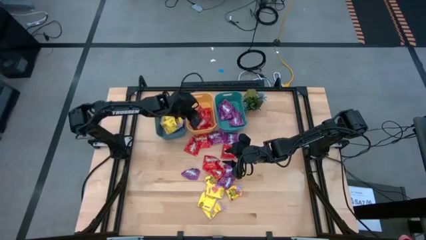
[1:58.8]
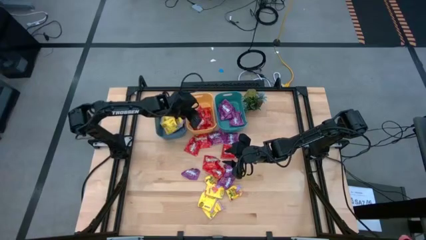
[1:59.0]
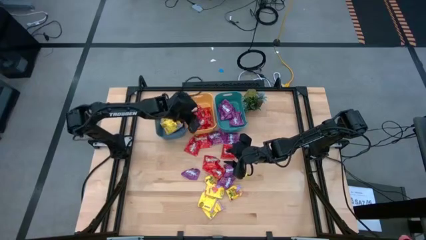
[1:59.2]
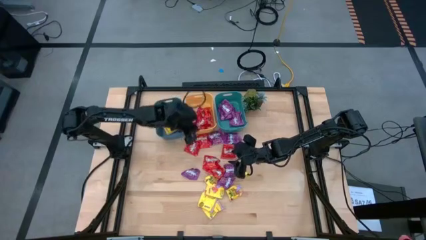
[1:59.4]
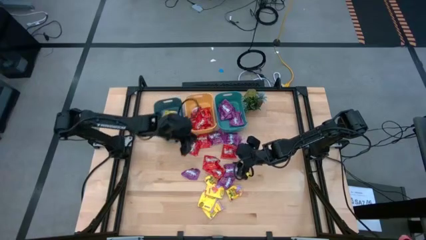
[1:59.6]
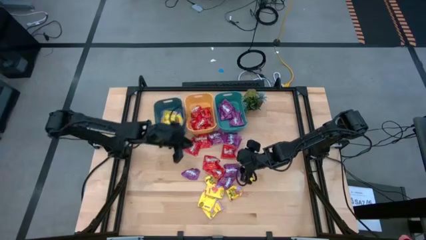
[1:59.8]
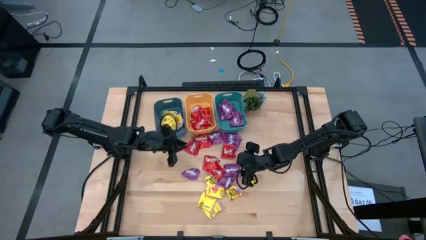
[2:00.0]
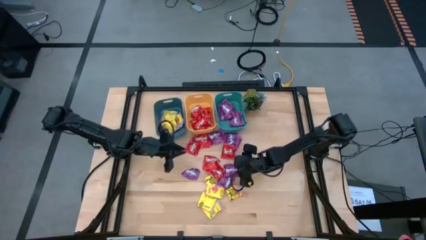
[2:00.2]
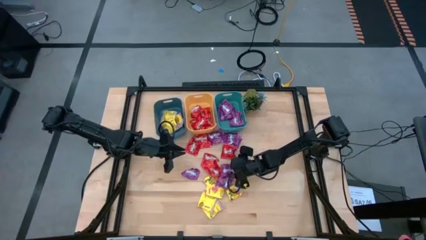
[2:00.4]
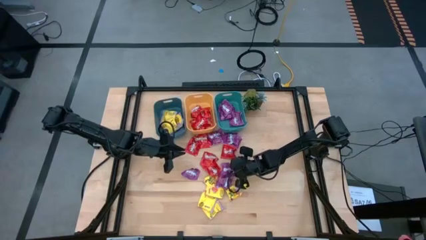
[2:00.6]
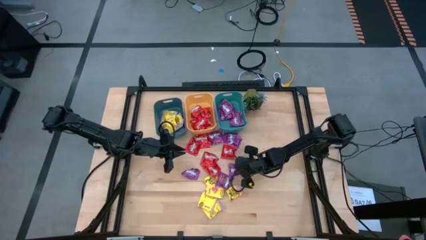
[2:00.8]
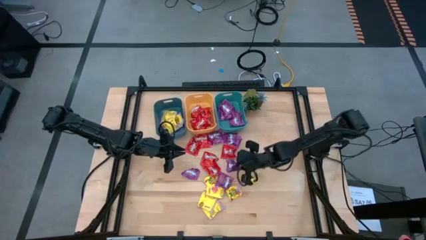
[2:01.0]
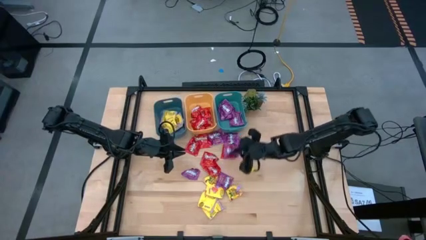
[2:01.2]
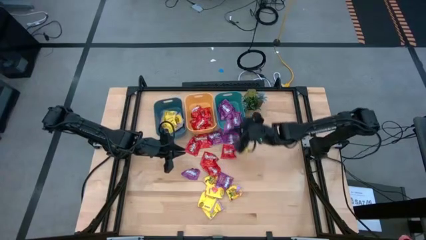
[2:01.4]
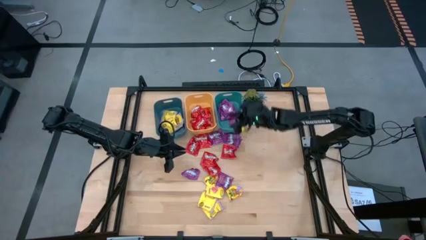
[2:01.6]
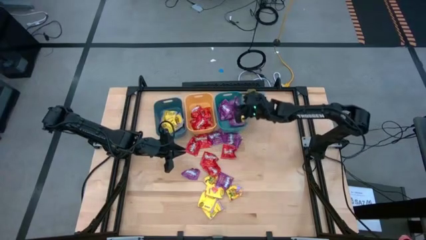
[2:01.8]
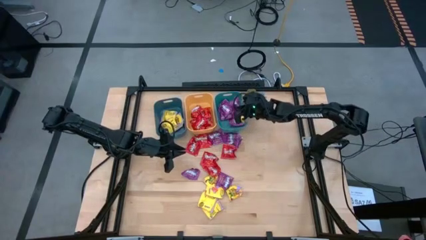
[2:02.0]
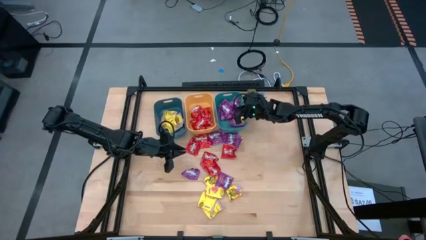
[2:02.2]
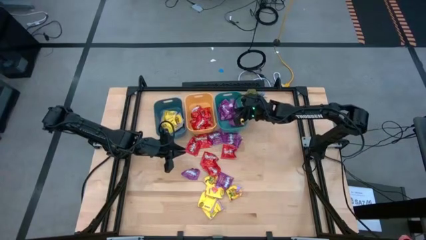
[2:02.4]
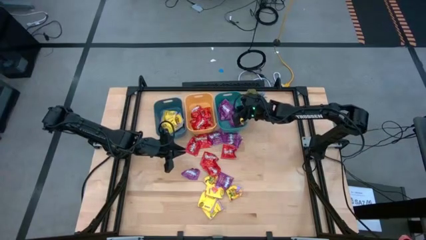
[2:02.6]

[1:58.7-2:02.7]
Task: Sort candy
Put the purple candy into the green bin

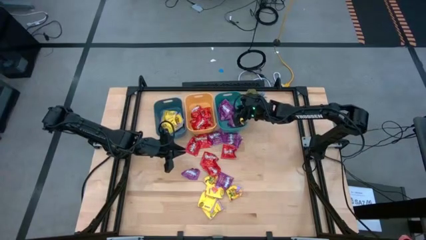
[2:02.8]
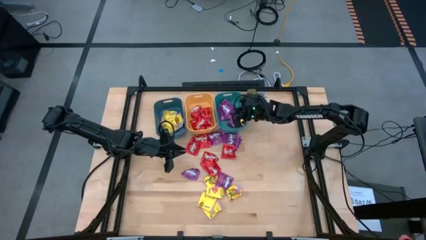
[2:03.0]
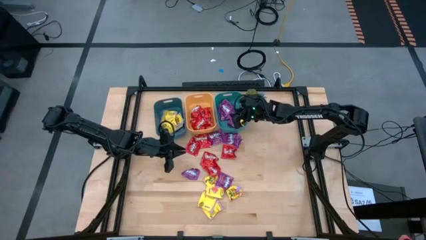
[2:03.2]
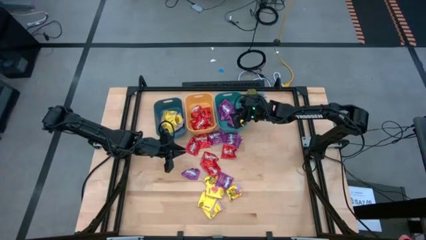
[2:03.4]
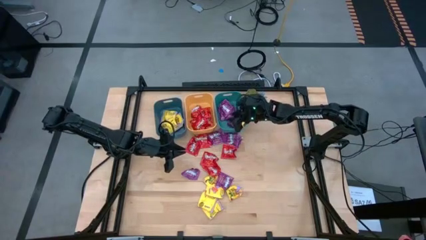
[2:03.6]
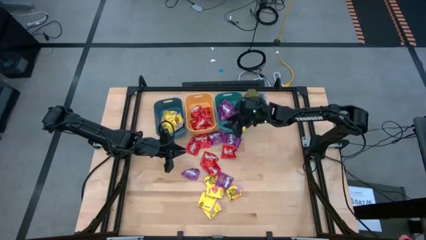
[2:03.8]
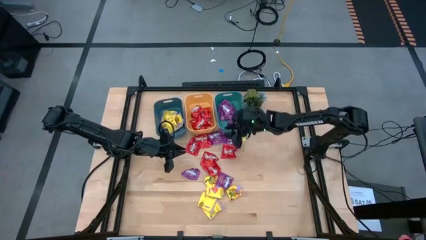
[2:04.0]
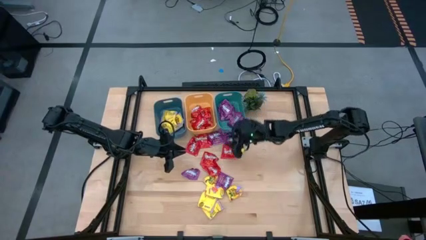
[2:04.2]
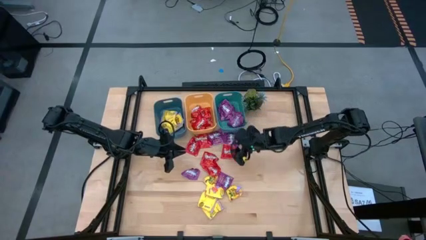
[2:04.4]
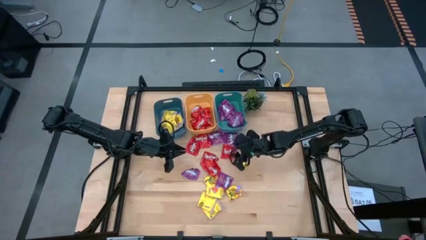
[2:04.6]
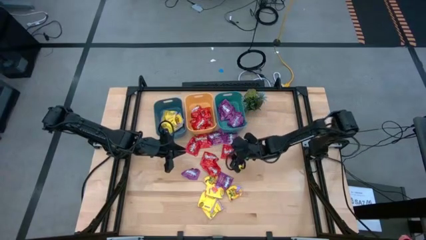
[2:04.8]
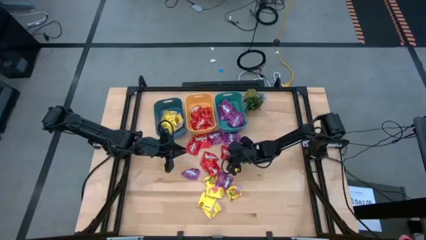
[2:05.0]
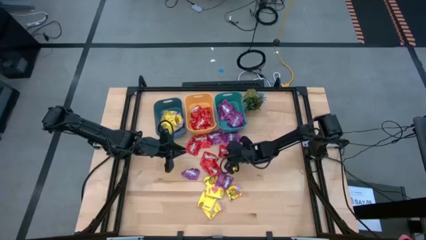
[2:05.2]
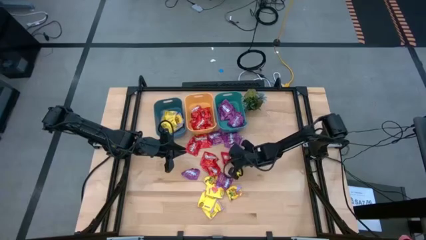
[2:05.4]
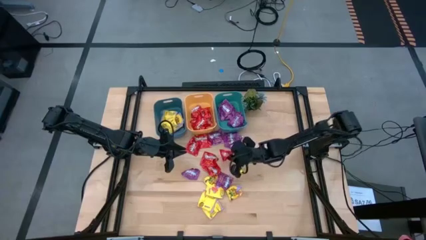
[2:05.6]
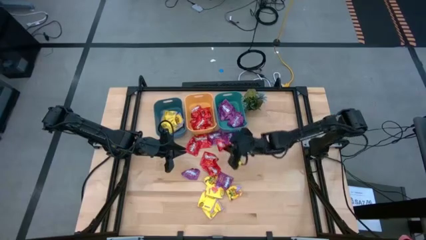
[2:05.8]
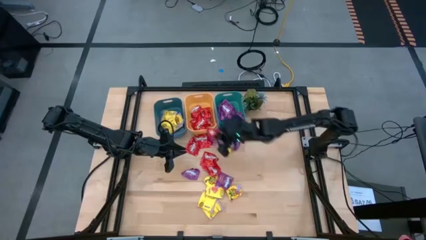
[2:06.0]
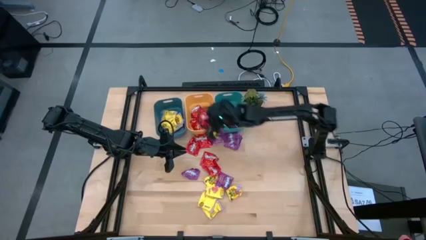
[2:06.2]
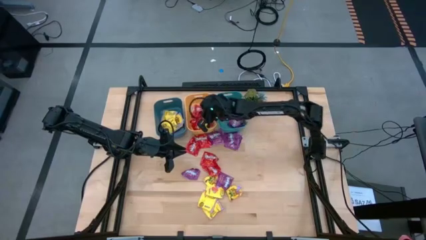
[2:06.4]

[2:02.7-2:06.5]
Put the red candy into the yellow bin

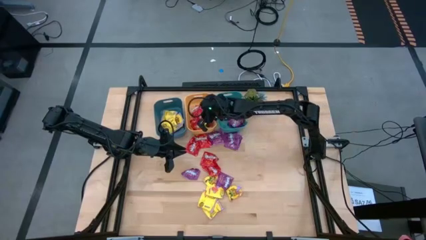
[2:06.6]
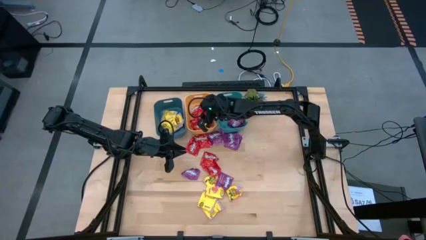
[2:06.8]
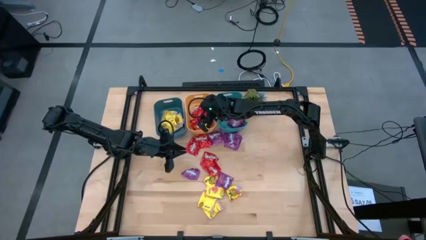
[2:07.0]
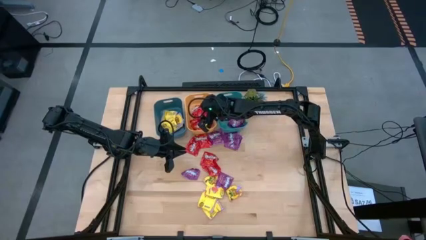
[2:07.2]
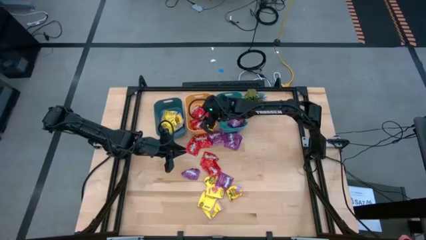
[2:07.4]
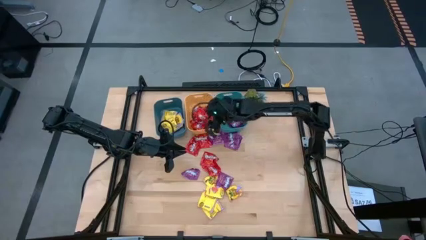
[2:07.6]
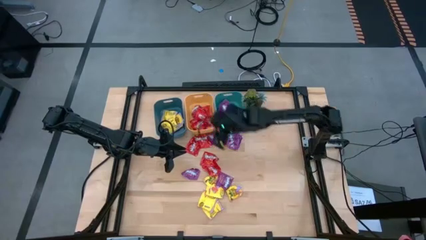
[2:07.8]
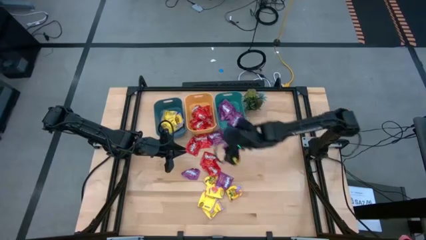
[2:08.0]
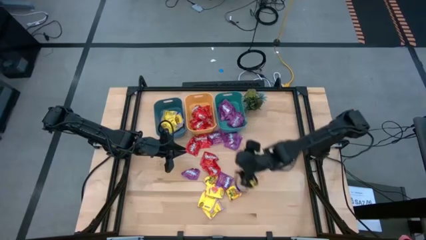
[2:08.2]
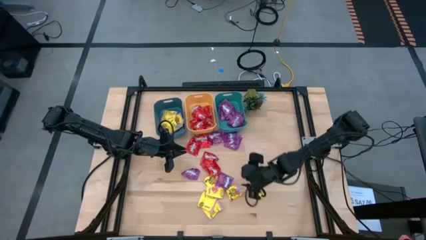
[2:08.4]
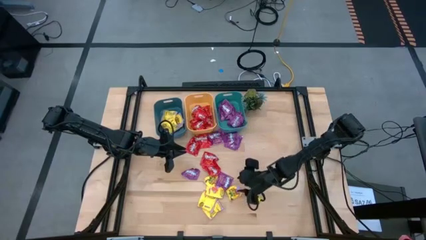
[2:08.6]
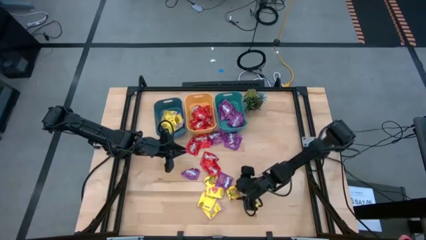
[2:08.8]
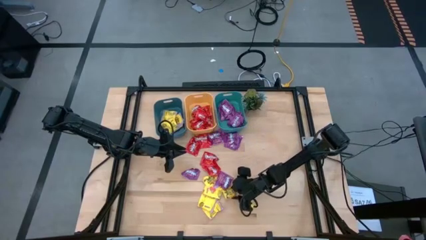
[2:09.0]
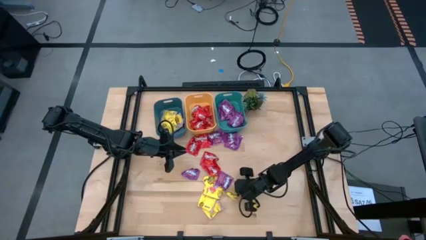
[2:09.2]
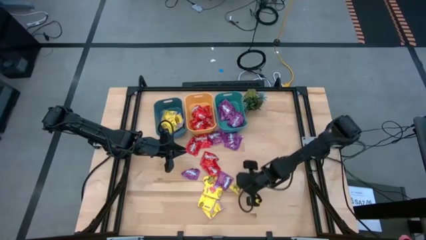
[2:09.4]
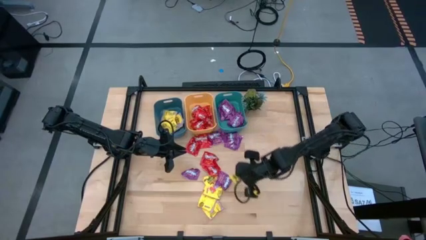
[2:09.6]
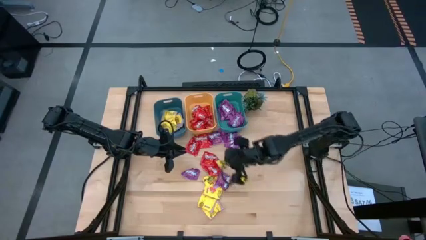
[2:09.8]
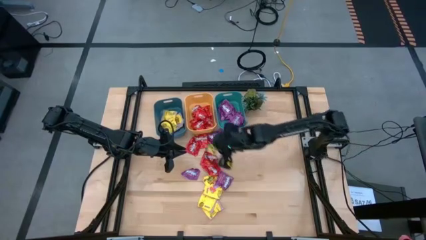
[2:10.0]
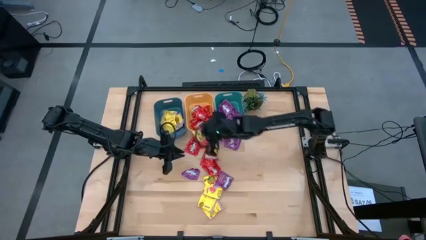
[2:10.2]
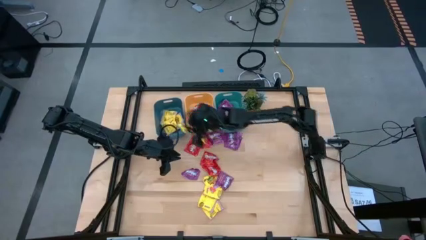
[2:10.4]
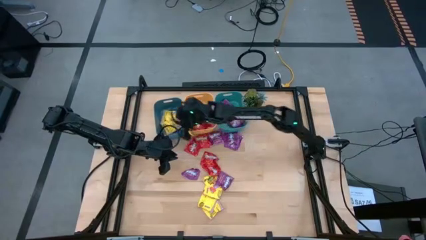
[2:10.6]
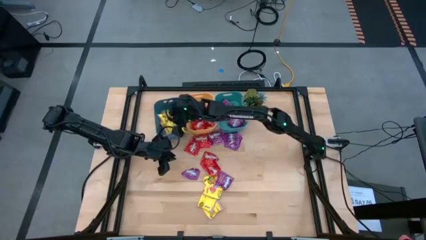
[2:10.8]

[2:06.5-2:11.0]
Put the yellow candy into the blue bin

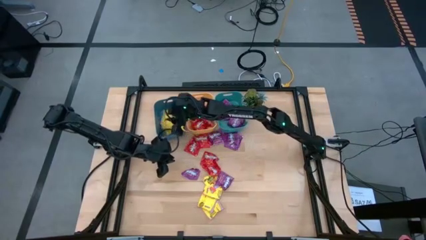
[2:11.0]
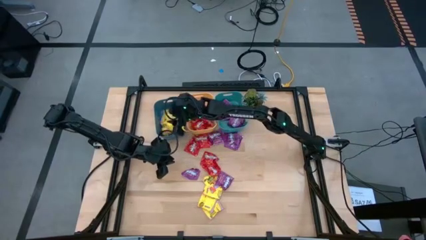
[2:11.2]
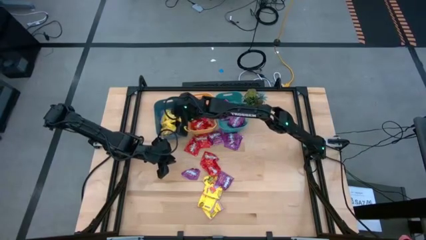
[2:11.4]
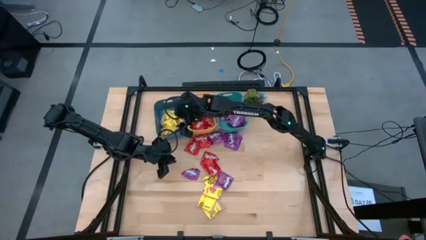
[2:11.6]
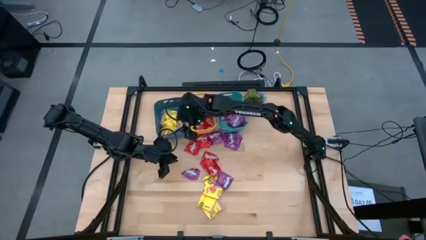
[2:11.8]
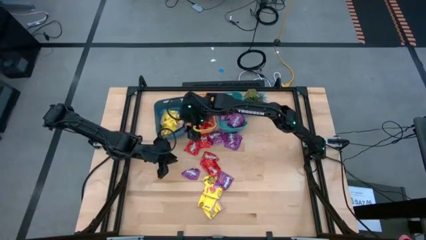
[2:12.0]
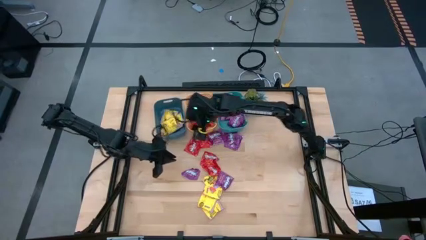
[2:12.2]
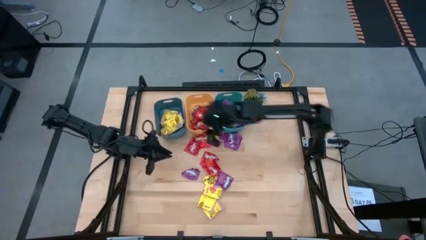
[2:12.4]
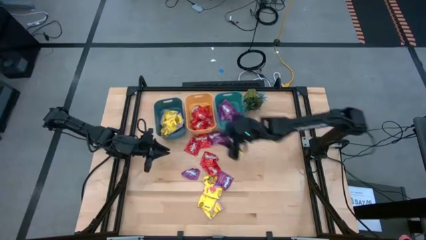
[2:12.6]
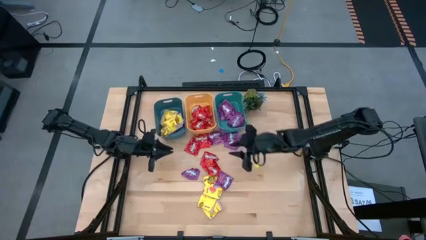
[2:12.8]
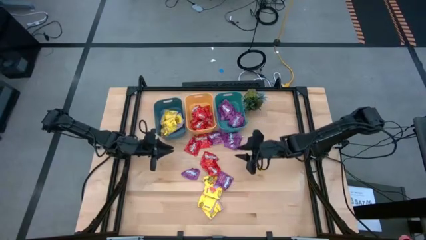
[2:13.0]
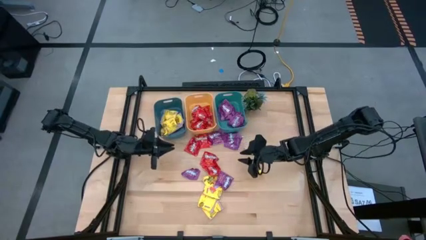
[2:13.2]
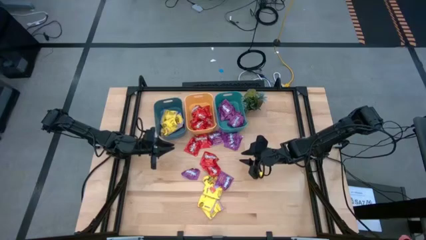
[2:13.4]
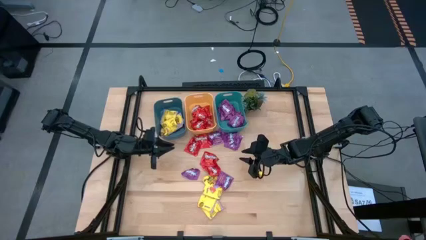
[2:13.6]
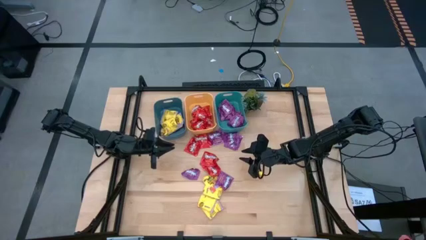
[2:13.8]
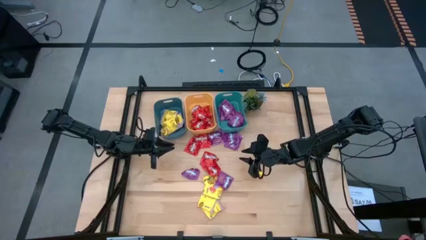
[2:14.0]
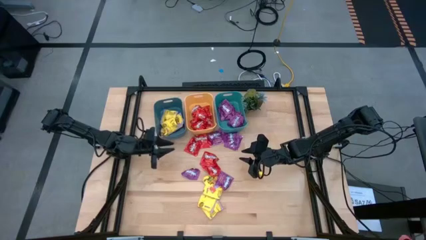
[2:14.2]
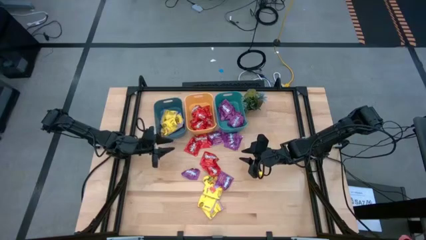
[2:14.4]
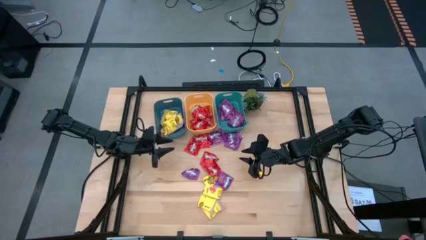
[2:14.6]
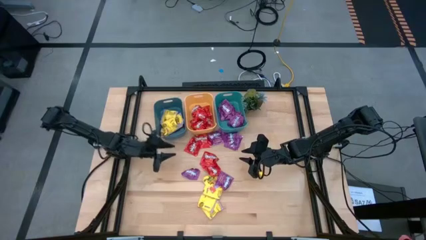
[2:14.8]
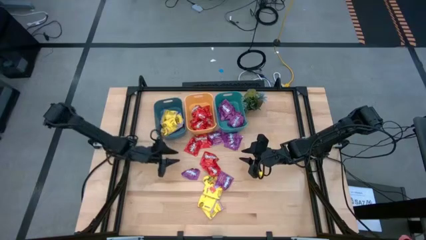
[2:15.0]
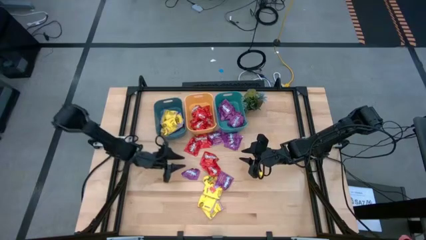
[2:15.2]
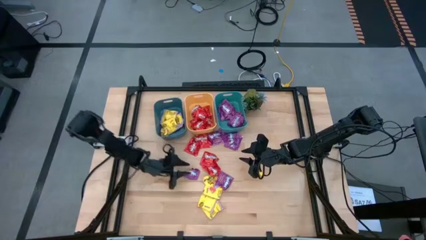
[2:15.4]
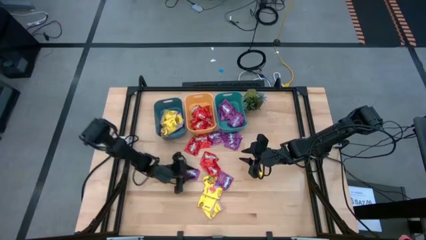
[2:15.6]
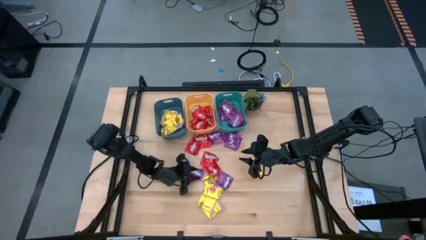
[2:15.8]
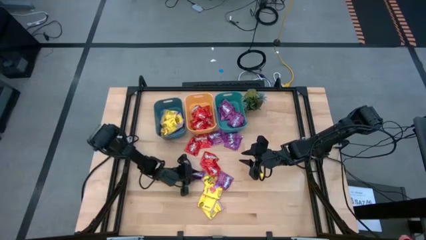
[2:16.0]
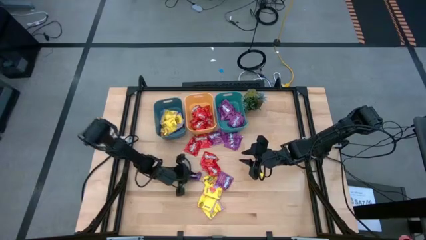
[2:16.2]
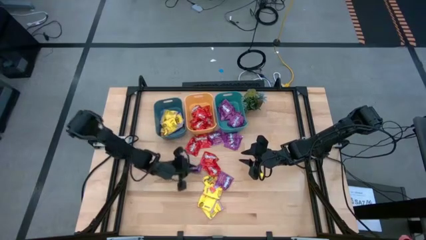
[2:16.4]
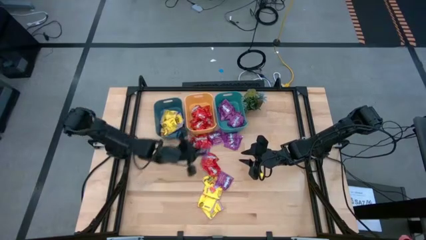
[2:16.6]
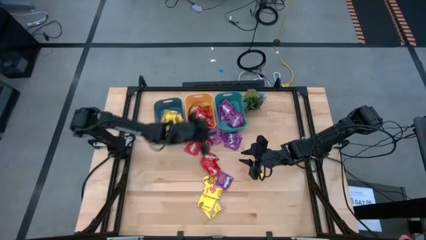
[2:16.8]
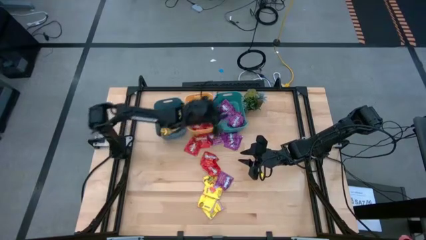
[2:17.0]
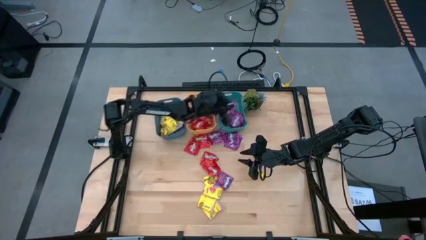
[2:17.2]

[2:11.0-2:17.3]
Put the purple candy into the green bin
